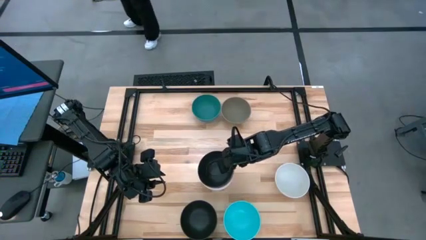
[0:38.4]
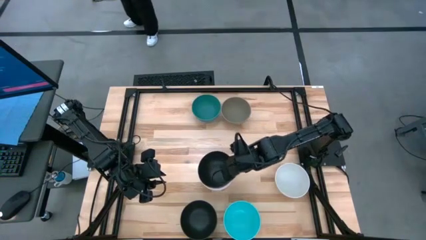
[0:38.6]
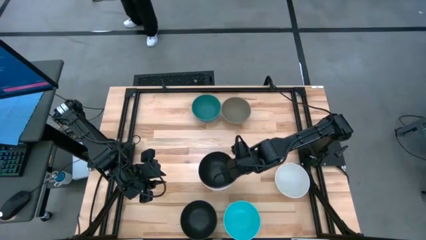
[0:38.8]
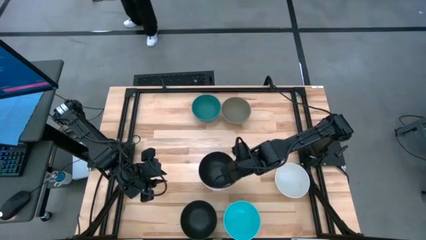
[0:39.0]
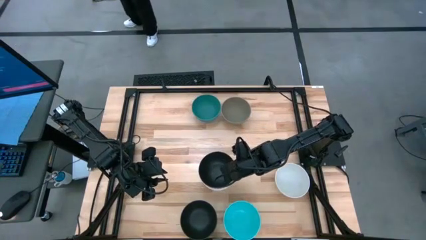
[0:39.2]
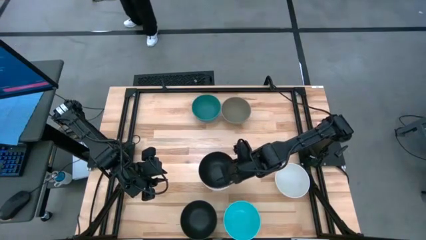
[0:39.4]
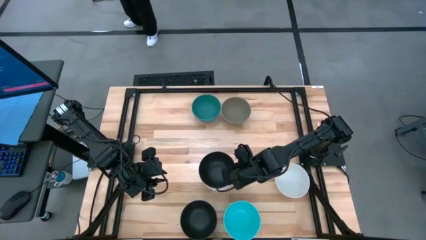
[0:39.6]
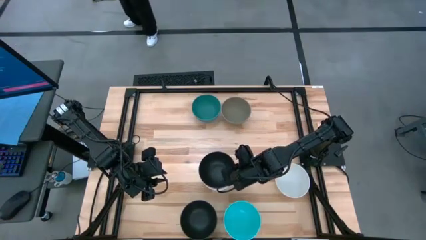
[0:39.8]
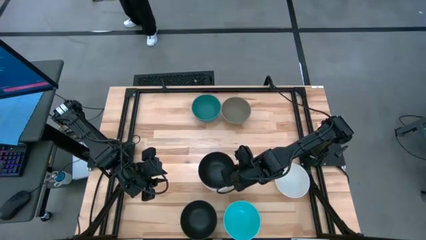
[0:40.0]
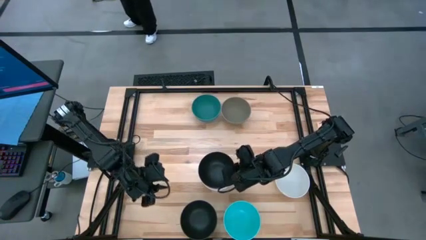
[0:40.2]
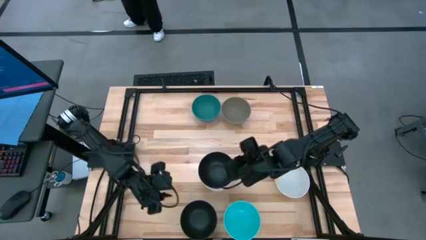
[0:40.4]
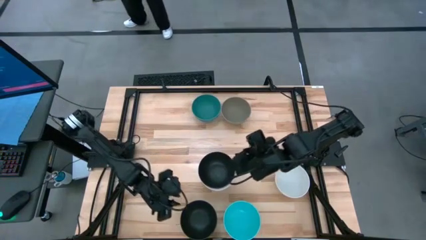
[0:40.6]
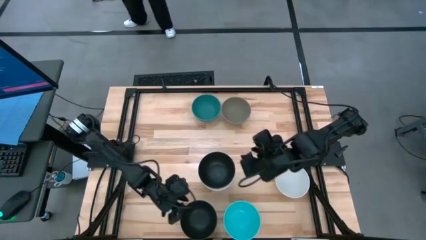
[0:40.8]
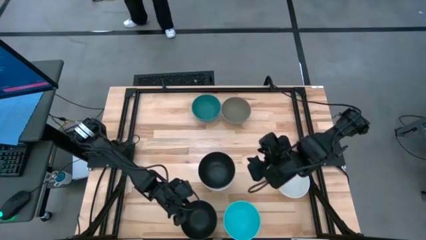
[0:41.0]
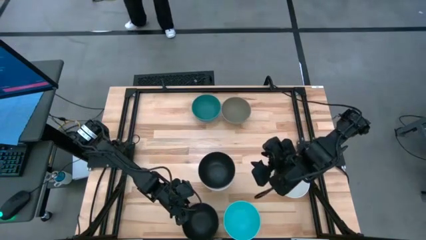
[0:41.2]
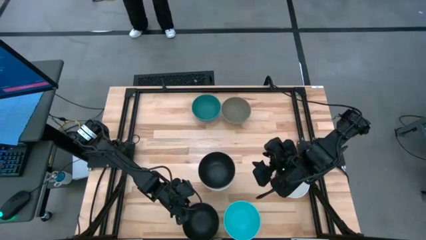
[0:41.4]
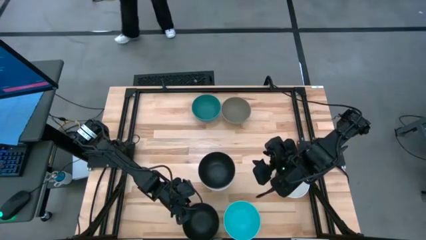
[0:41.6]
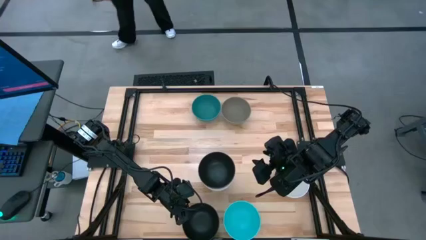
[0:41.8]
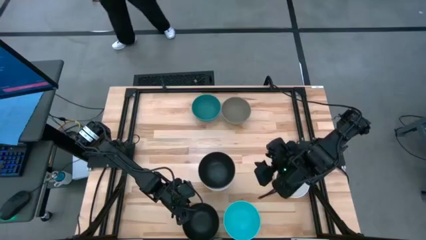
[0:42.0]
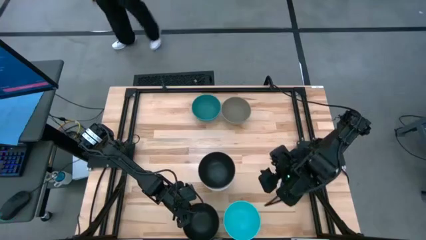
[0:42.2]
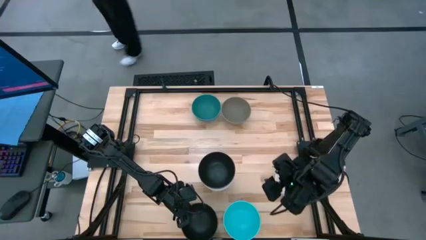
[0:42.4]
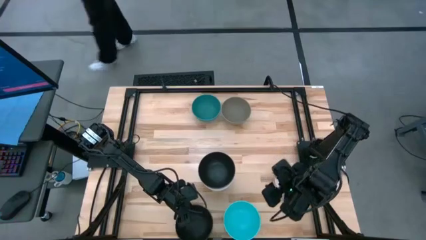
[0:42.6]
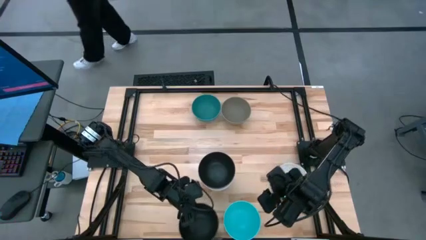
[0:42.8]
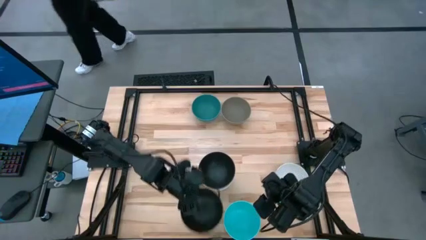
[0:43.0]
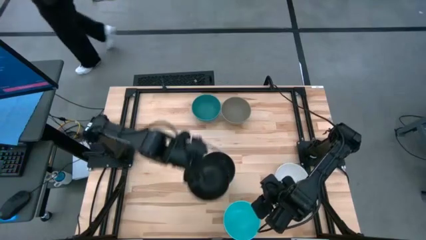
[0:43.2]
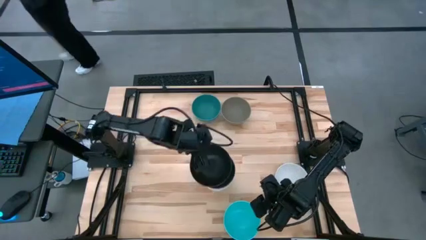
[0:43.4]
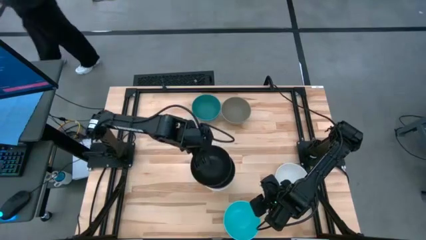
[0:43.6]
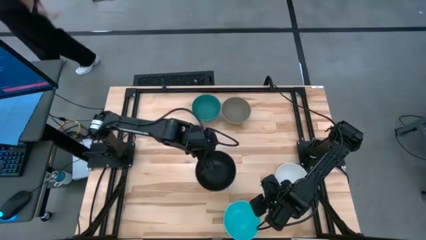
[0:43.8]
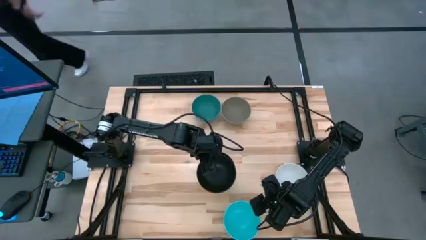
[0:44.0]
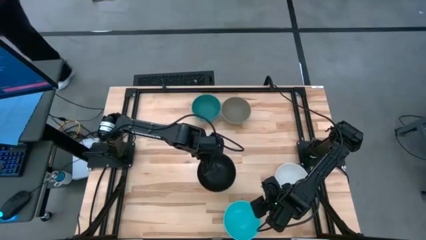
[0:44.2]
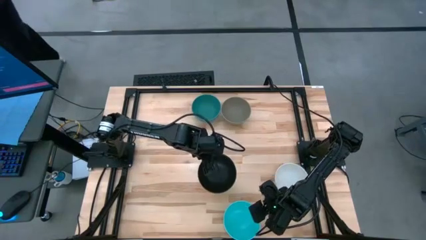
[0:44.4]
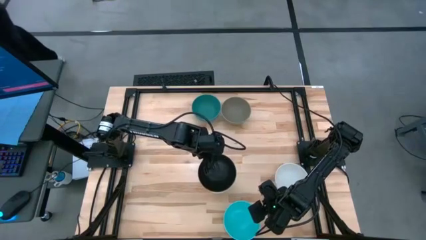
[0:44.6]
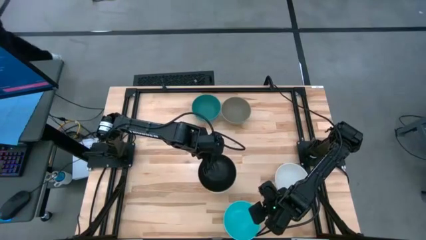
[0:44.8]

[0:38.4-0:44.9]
Task: Nest bowls inside each other
Stack the black bowl on the top of the black bowl

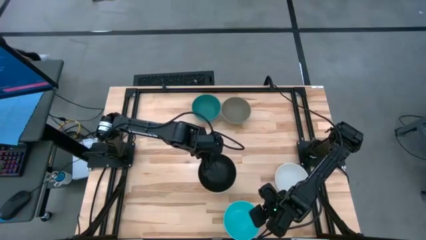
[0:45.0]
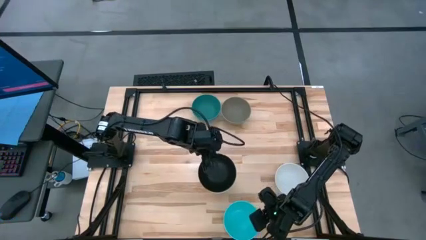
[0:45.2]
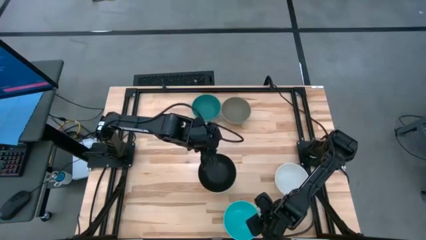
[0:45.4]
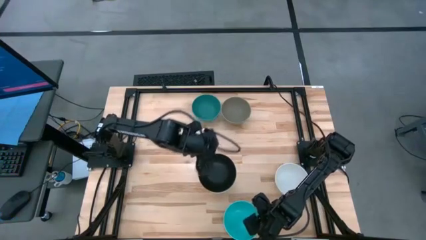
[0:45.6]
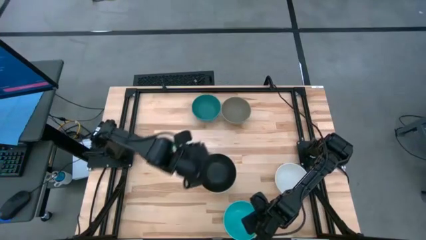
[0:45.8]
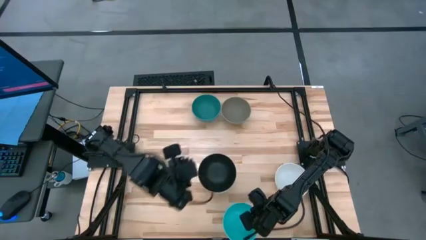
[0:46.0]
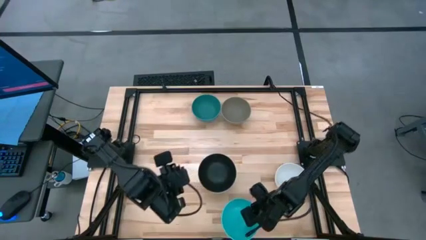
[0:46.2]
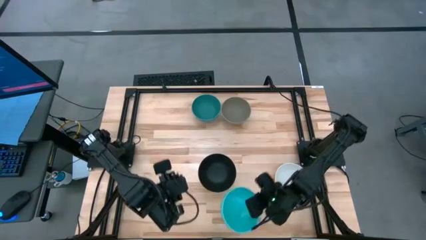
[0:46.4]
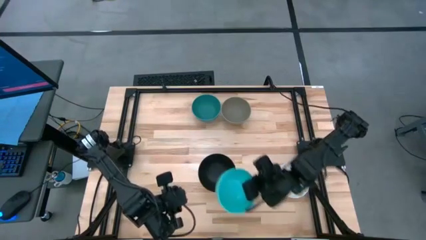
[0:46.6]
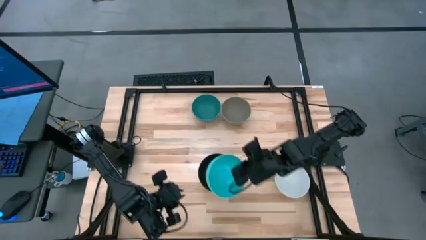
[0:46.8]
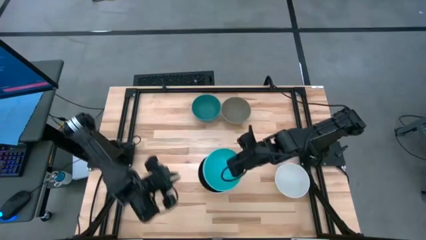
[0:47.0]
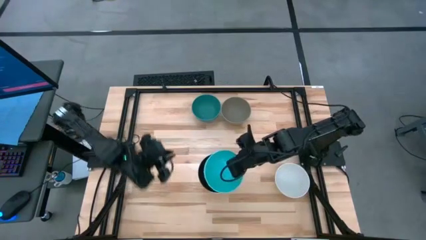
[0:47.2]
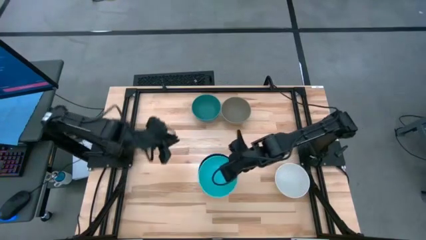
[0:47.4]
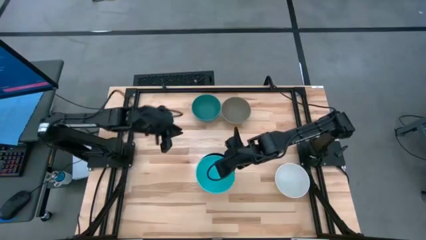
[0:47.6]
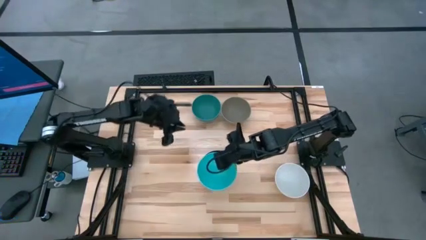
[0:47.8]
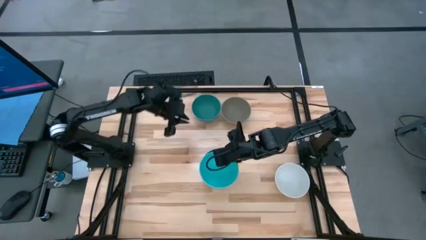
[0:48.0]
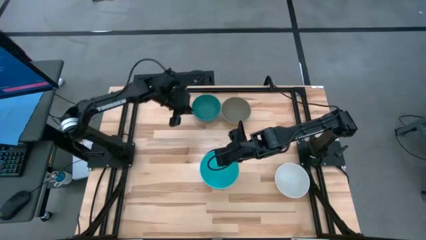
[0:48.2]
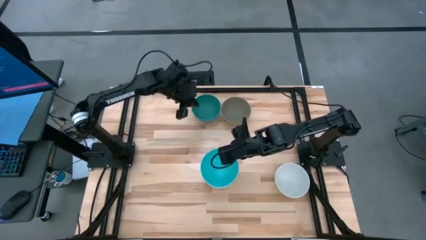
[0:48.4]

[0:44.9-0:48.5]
Stack the sky blue bowl on the top of the black bowl

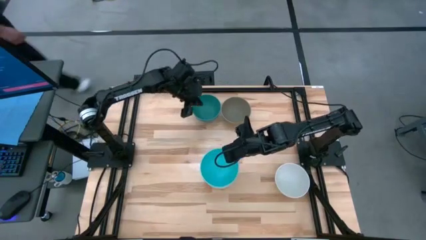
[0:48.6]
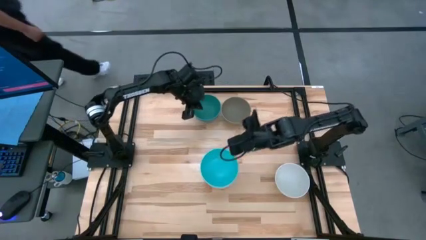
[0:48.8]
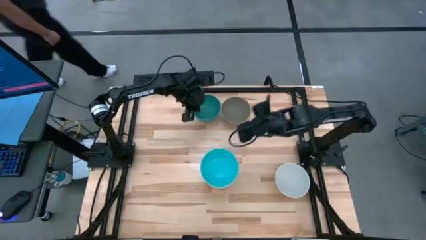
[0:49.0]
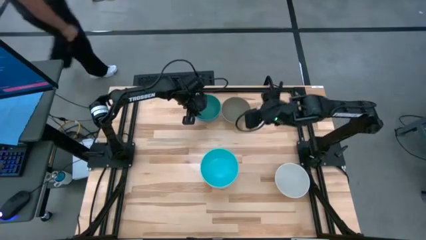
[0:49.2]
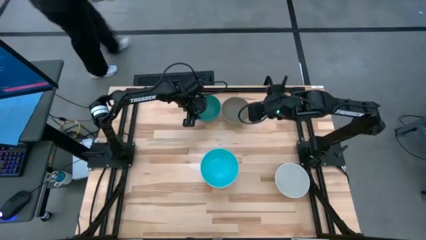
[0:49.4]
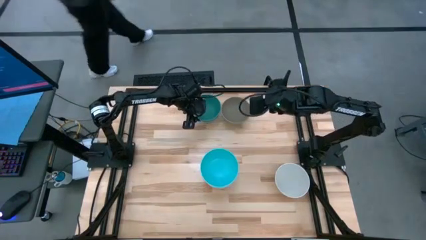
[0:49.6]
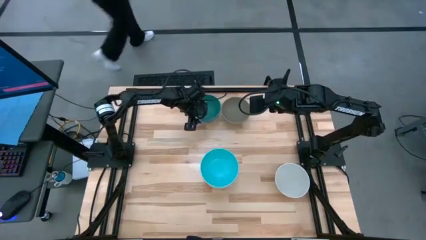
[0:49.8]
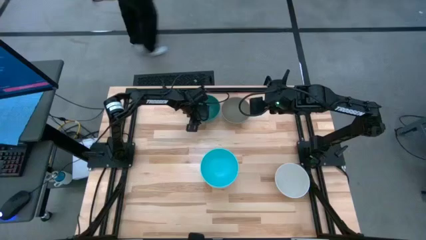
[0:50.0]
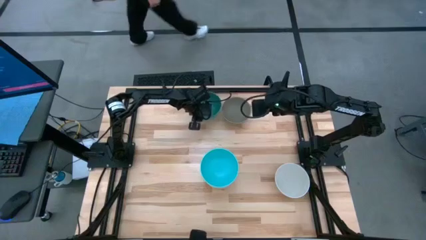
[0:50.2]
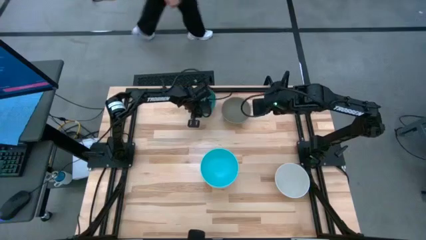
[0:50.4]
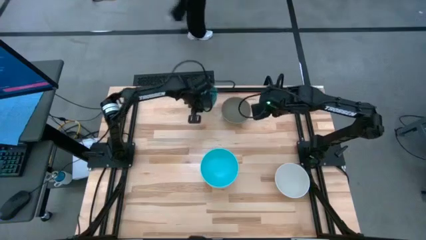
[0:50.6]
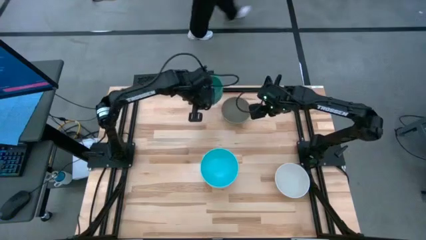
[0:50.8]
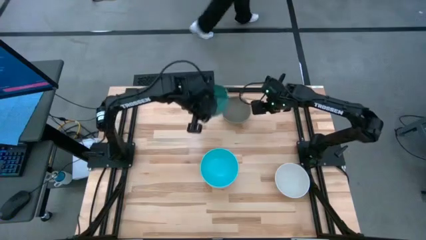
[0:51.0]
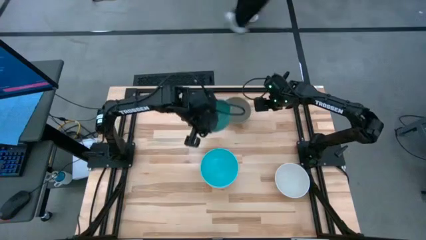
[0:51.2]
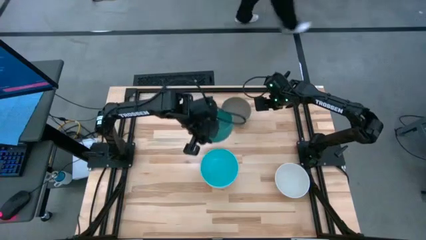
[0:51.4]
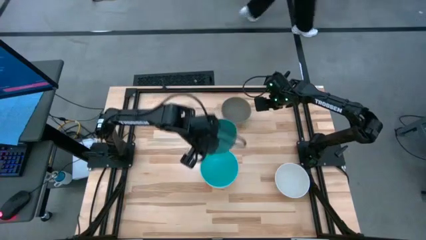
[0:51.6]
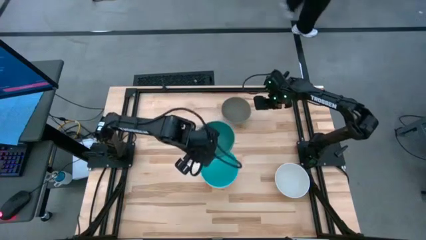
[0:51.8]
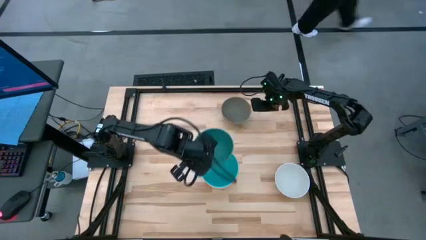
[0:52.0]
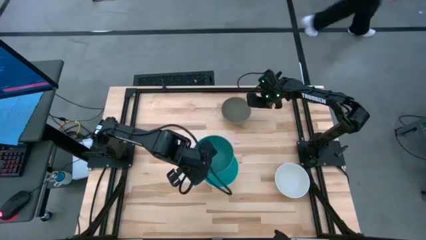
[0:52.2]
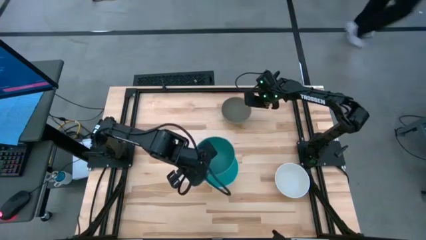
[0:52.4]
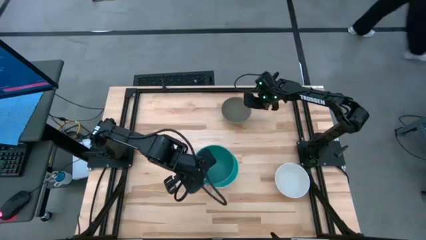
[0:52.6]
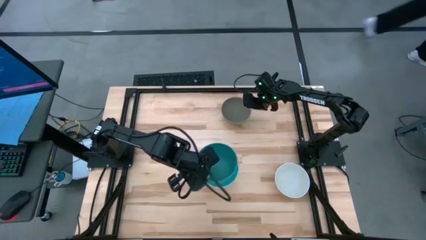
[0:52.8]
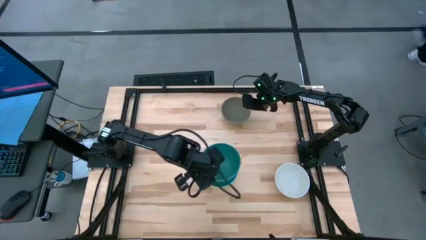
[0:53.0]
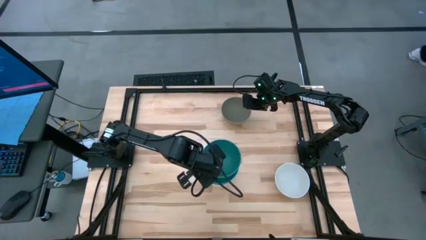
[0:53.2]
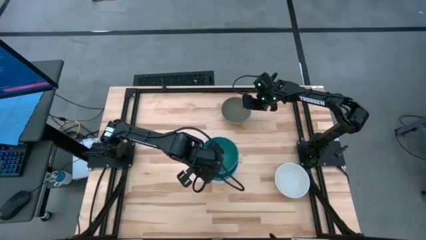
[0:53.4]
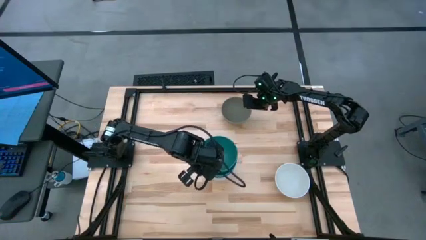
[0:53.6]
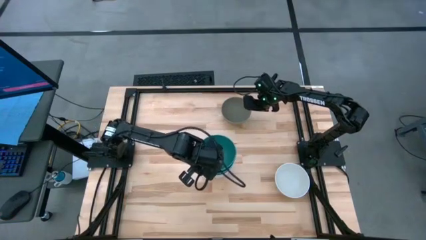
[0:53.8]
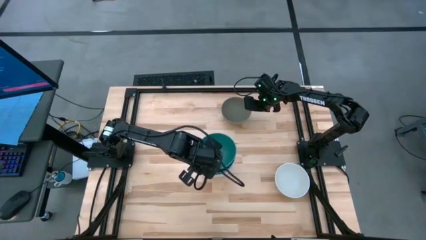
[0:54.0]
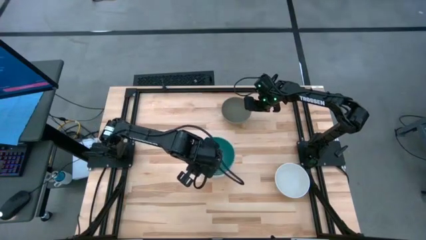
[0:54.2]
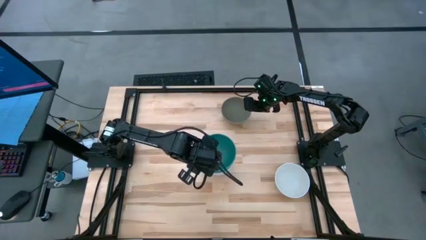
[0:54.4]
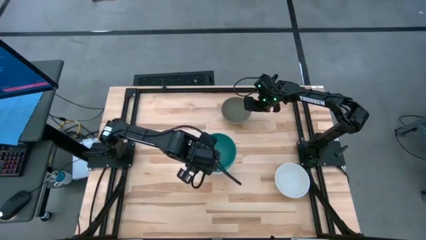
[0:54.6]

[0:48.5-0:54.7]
Stack the blue bowl on the top of the skyblue bowl

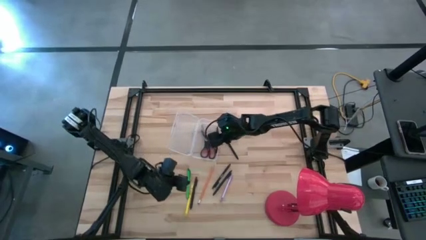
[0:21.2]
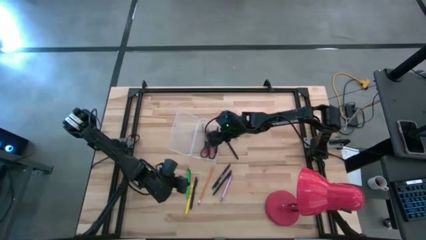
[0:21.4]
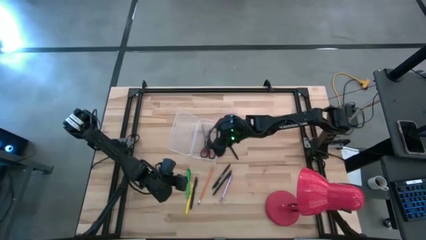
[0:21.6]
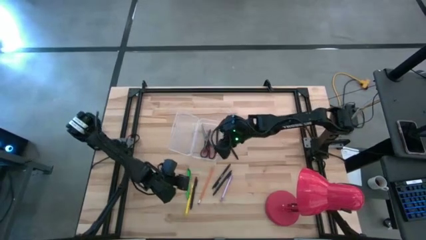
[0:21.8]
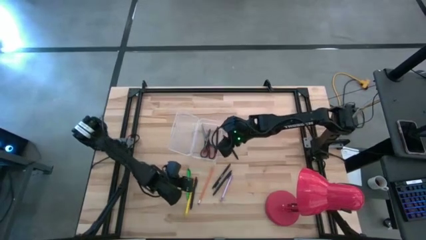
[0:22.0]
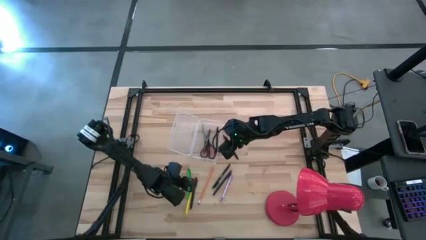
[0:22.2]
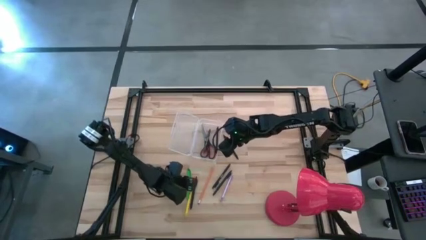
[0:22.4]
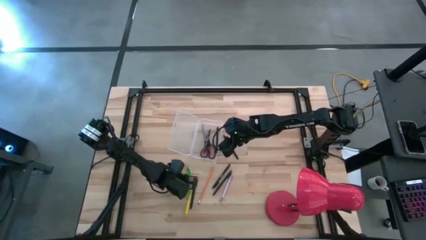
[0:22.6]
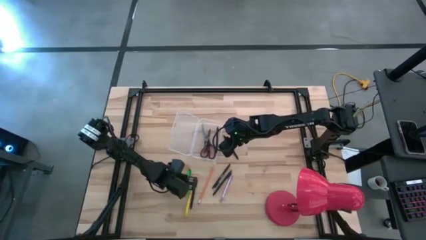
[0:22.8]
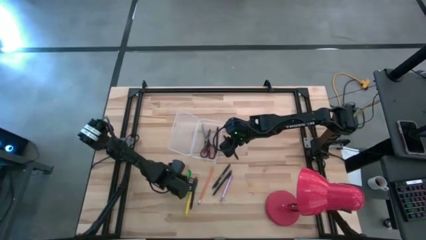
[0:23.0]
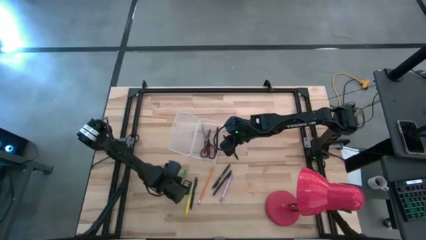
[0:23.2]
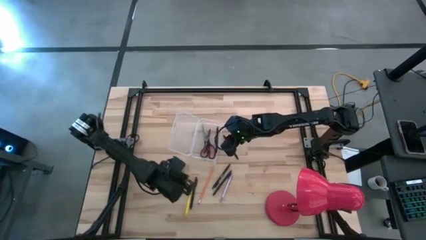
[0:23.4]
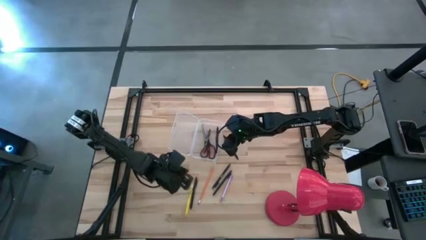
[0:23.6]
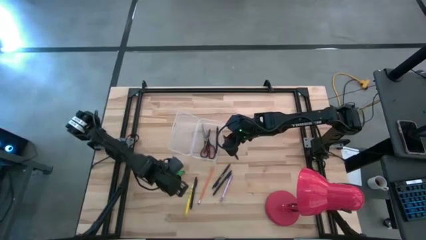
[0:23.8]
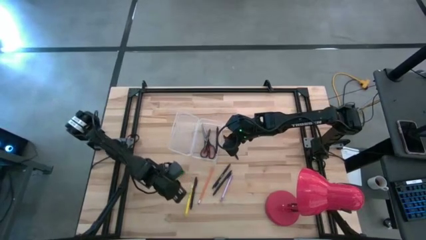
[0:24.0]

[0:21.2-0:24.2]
Task: Pick & place school supplies into a supply box
Put the green pen into the transparent supply box
